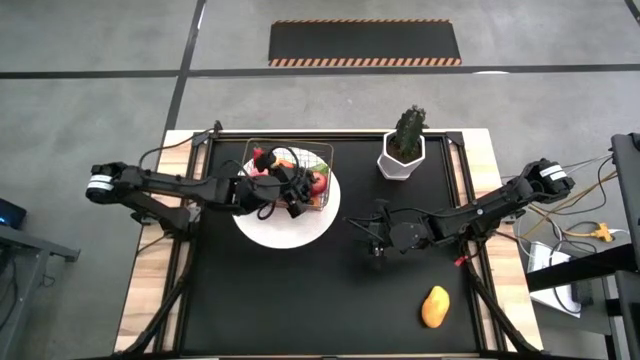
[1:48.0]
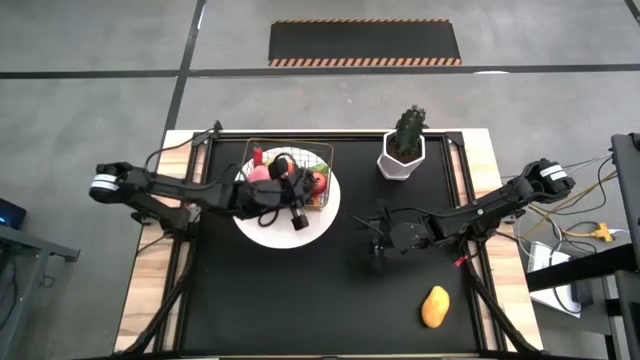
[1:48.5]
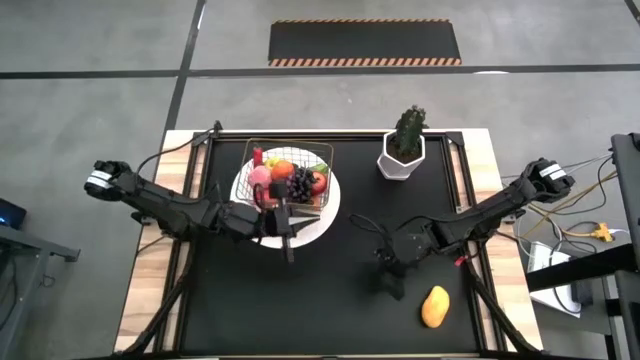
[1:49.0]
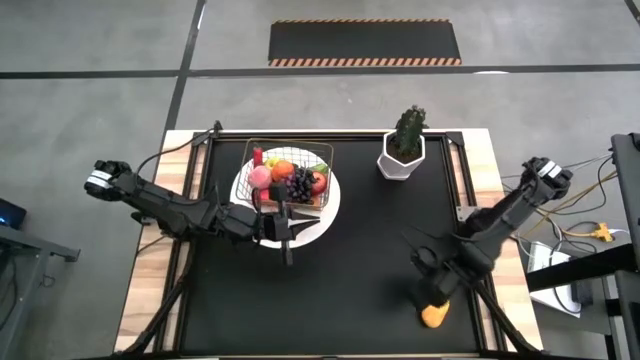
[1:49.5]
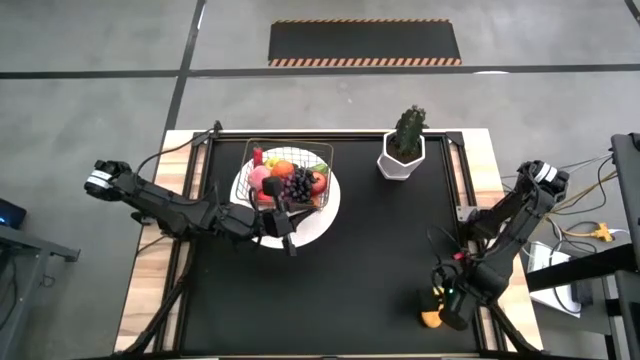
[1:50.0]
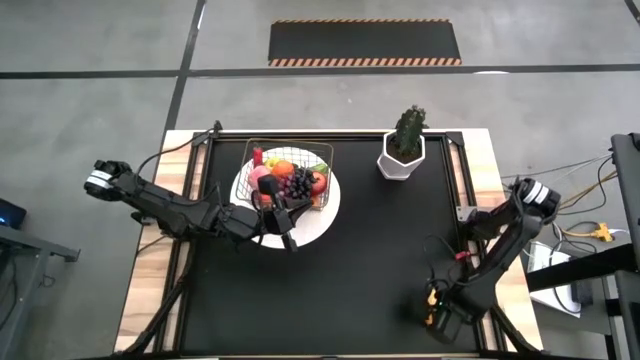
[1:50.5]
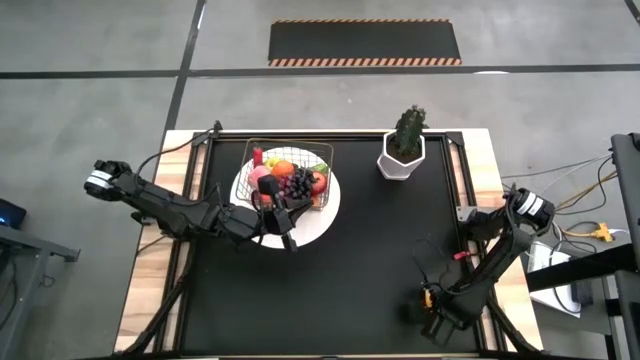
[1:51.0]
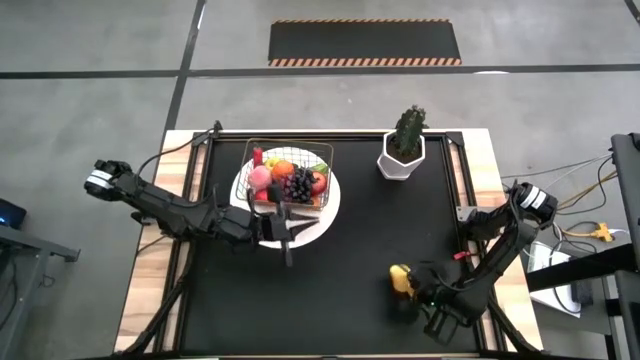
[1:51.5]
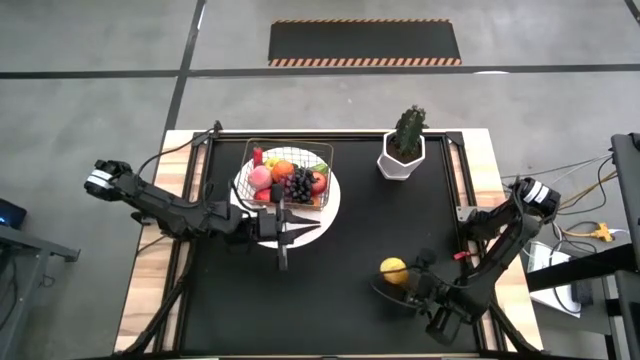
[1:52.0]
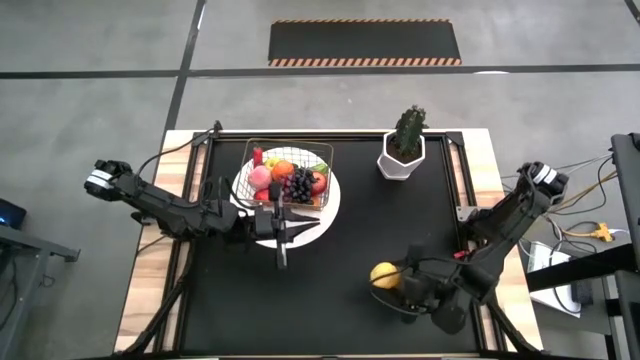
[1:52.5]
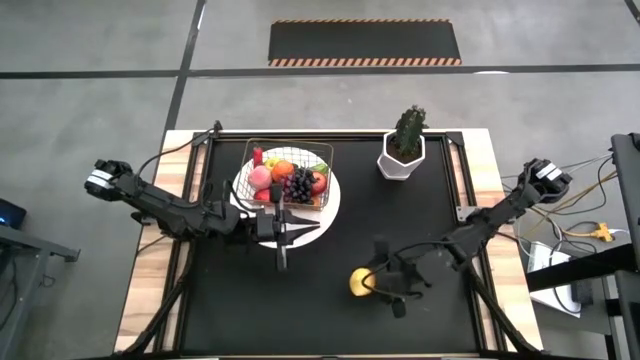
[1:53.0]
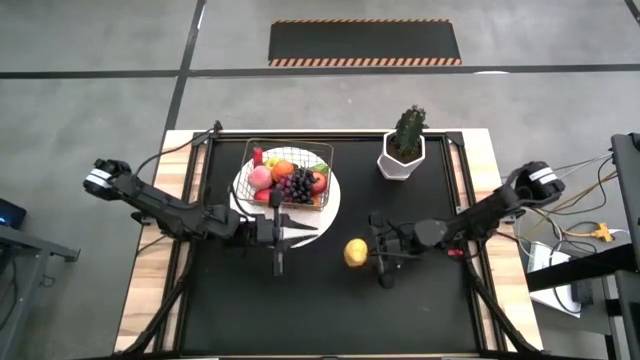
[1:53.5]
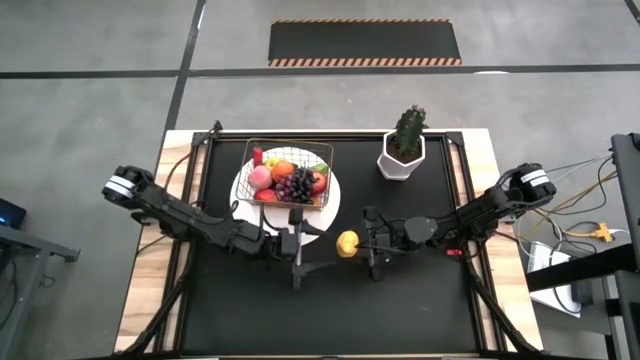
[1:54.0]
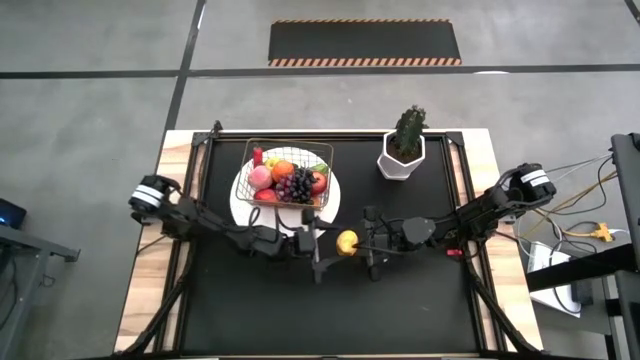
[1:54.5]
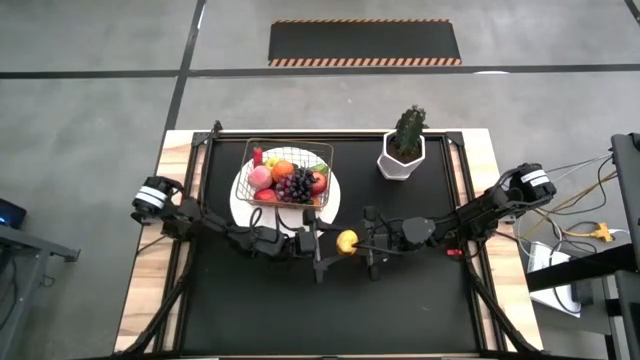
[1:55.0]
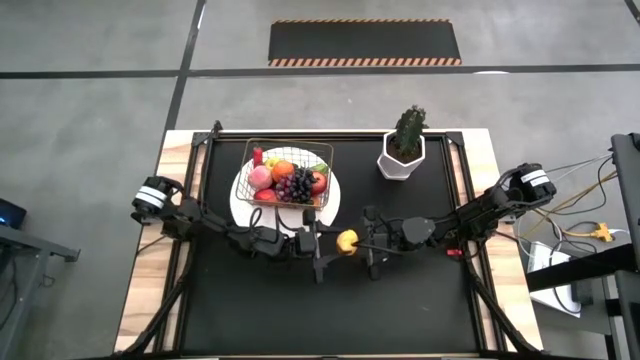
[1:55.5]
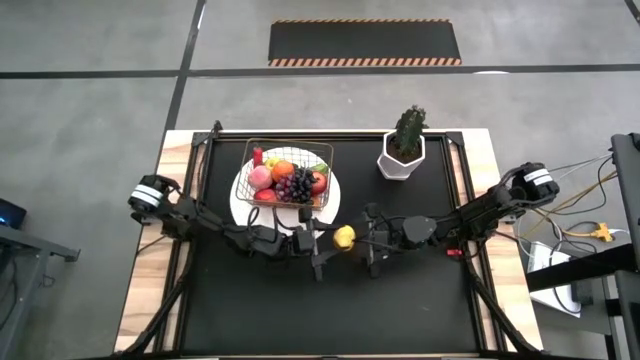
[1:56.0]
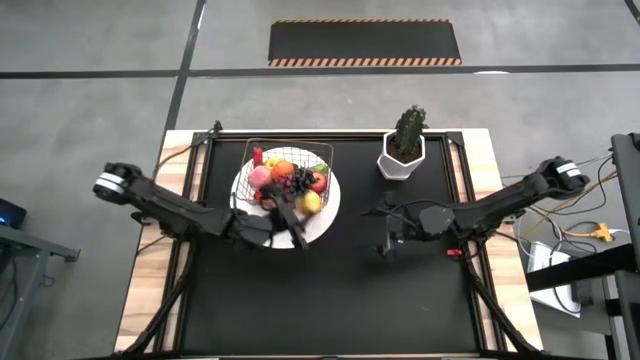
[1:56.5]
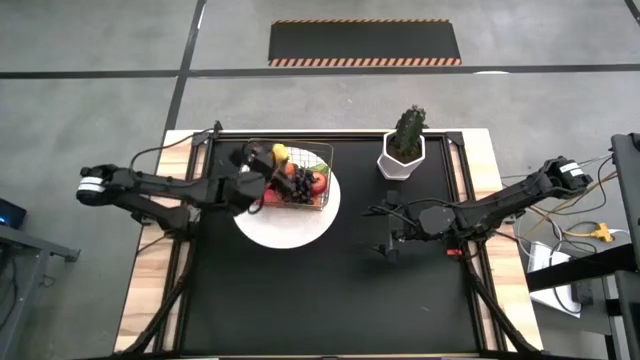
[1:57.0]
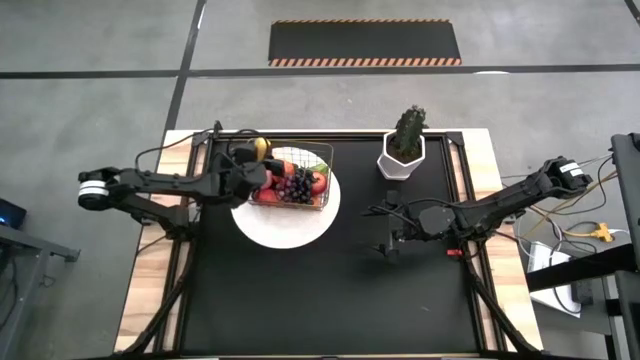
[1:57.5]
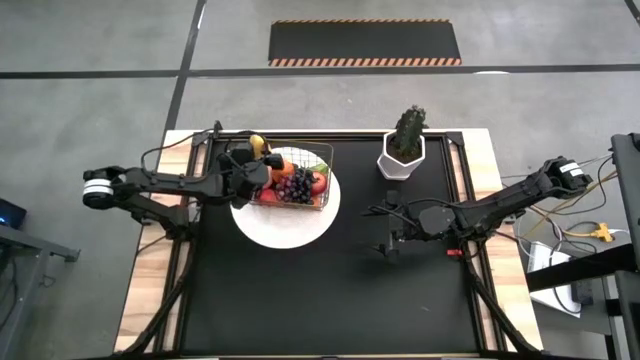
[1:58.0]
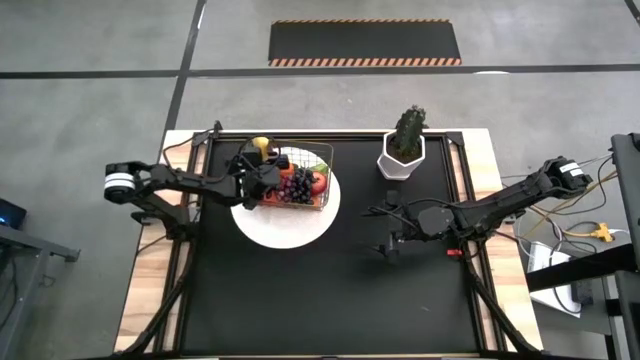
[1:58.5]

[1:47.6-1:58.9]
Task: Build produce basket
Put the mango in the gold wire basket

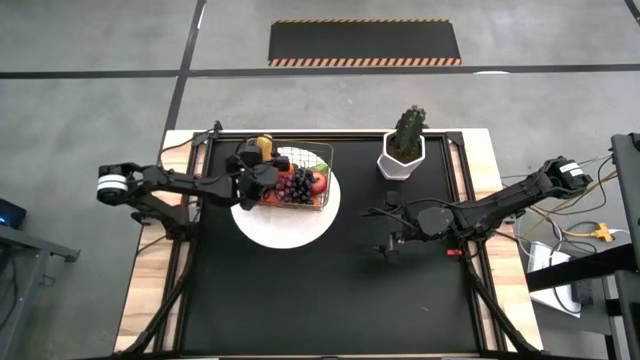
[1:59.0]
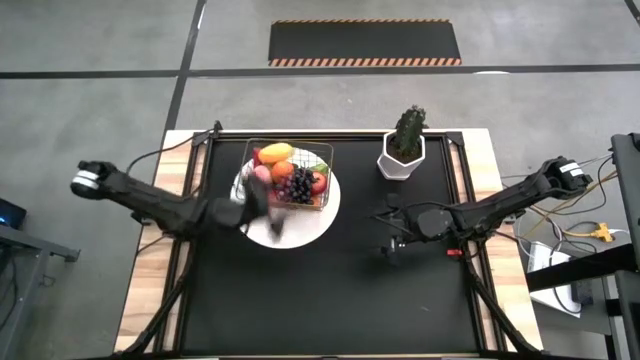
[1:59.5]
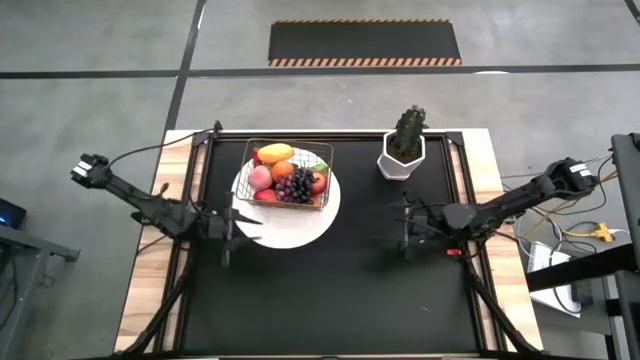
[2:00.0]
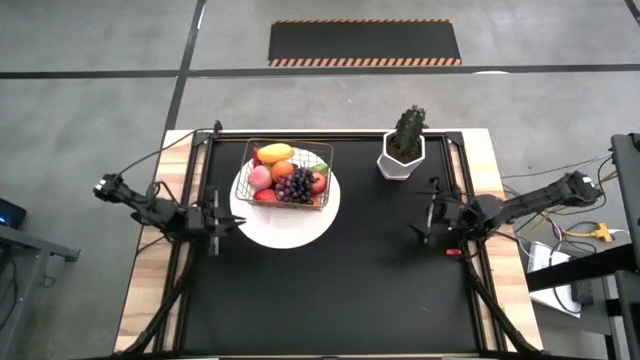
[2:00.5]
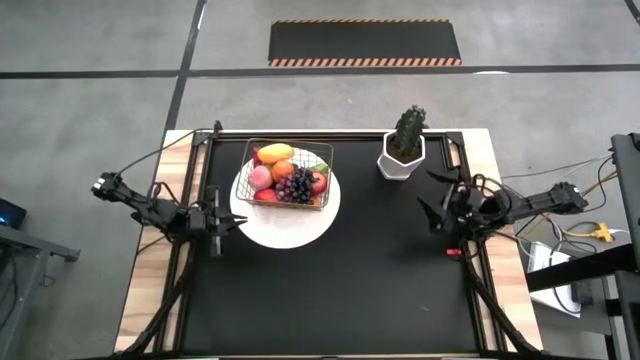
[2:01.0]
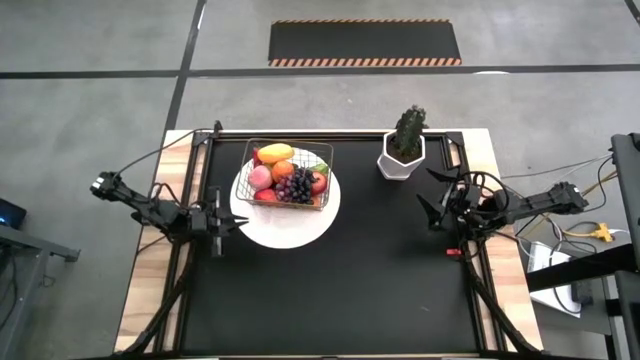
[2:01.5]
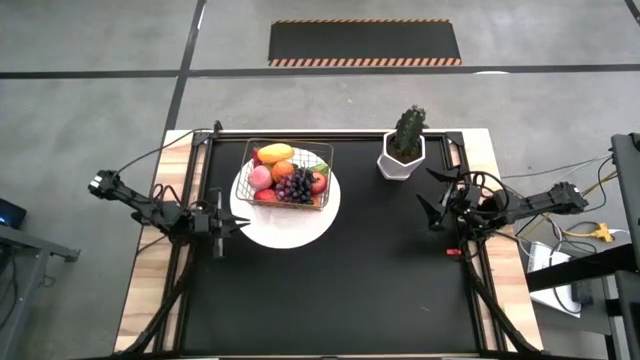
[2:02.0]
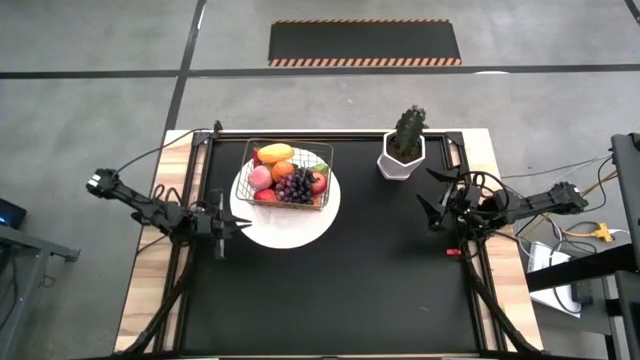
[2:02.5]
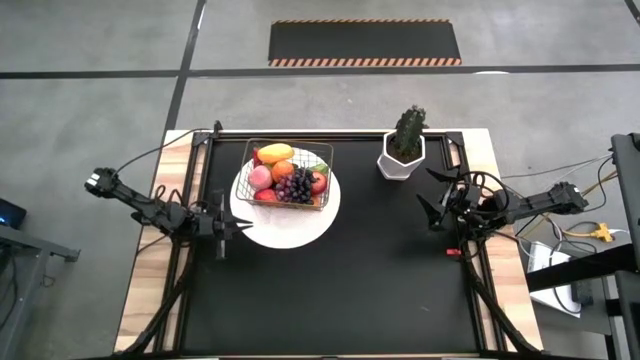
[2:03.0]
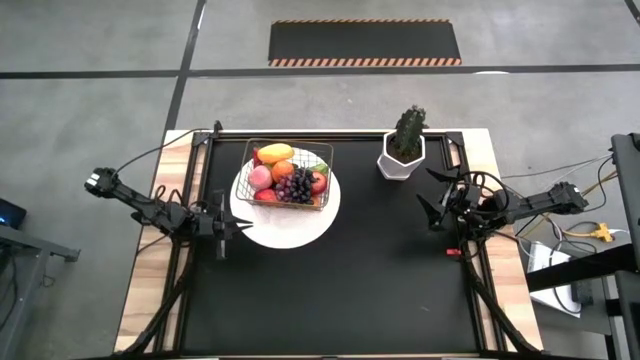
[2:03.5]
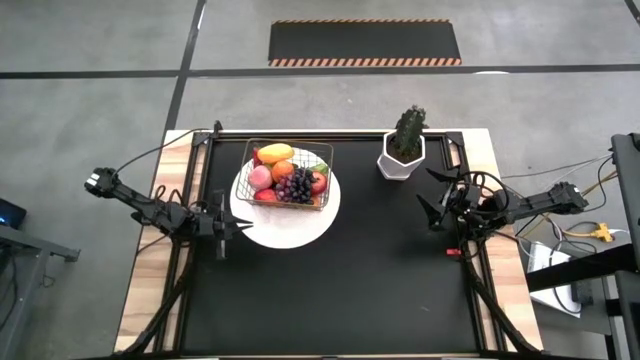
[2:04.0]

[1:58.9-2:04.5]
Return to Home Position

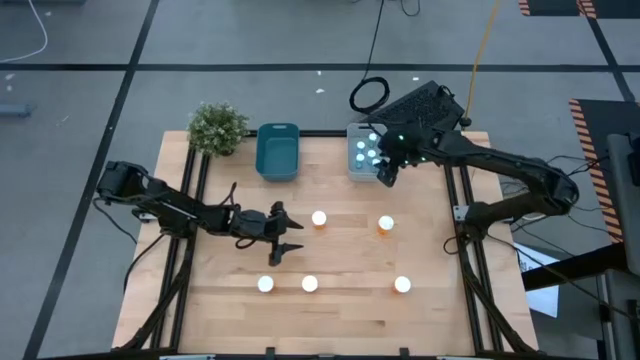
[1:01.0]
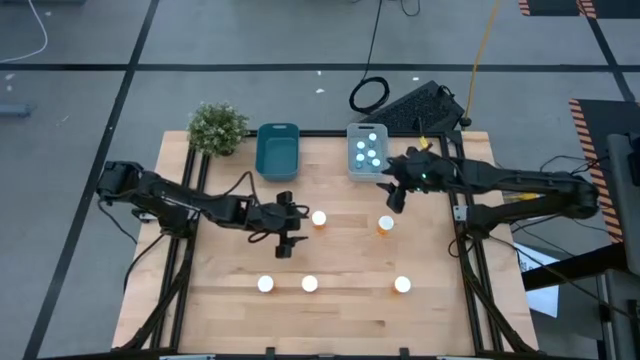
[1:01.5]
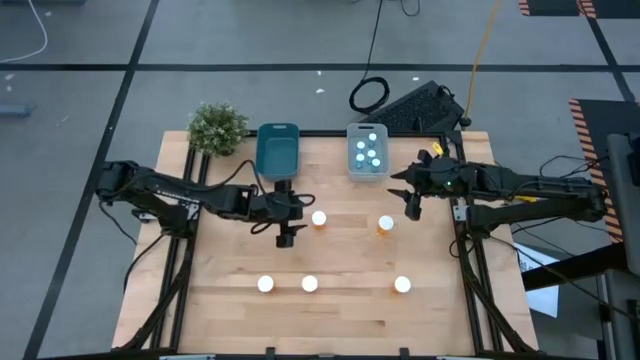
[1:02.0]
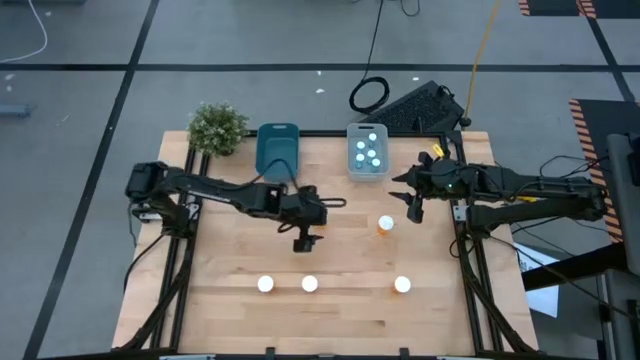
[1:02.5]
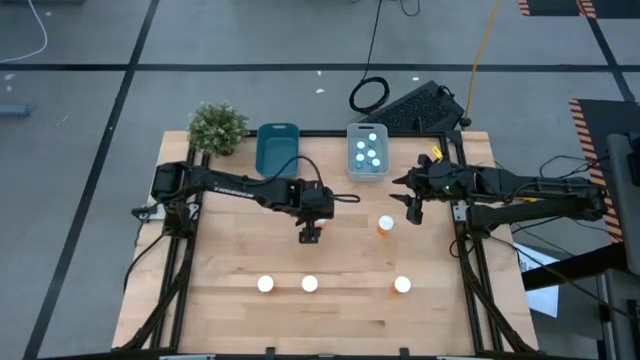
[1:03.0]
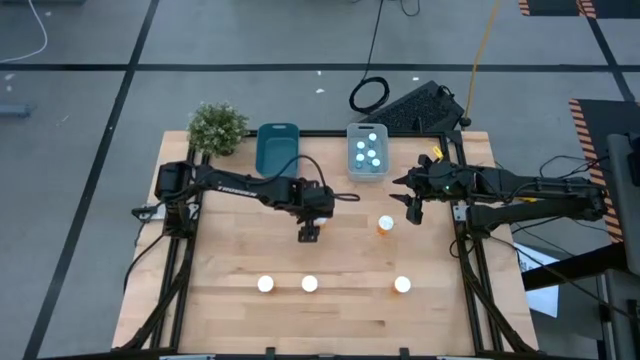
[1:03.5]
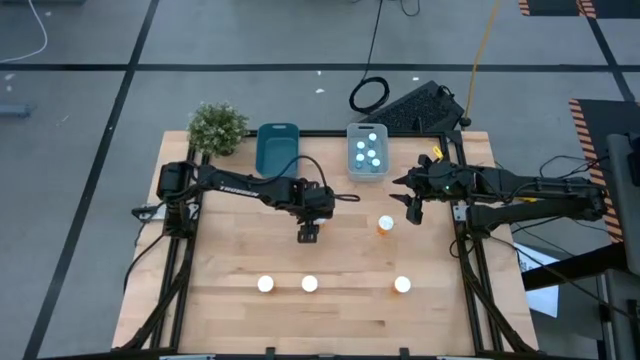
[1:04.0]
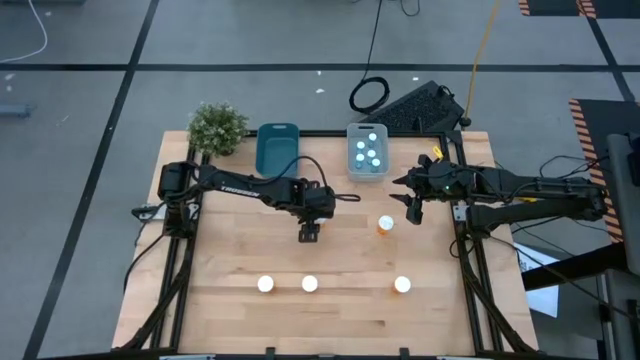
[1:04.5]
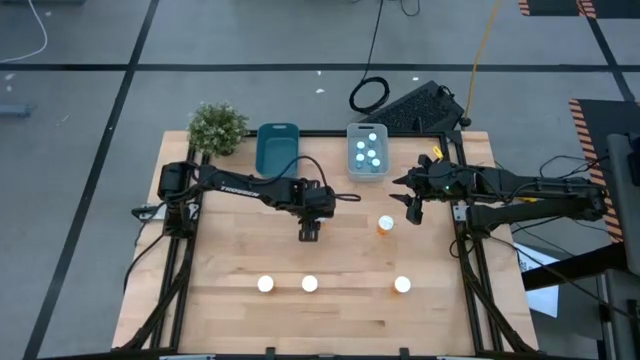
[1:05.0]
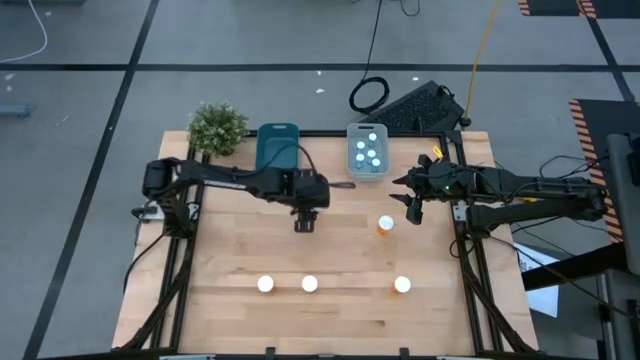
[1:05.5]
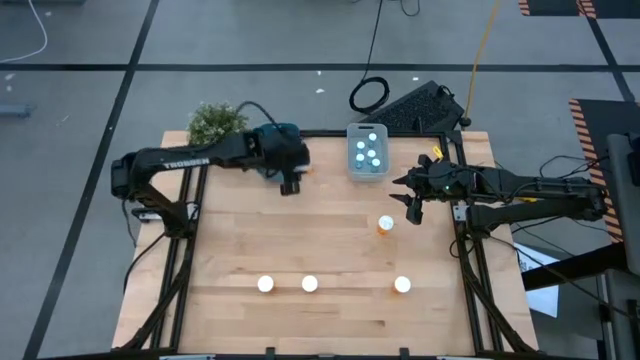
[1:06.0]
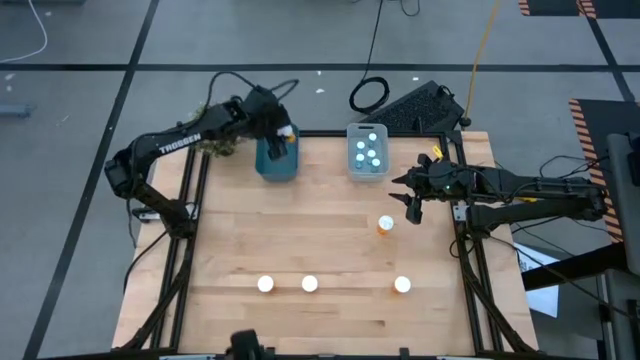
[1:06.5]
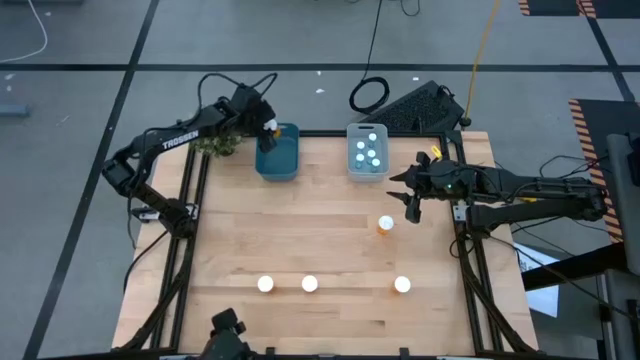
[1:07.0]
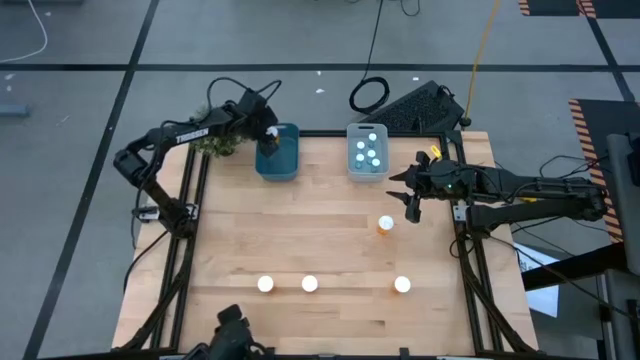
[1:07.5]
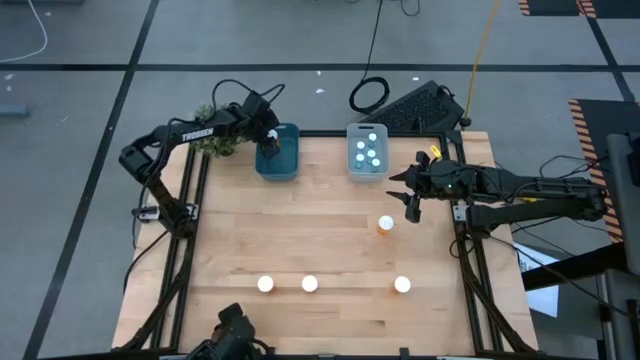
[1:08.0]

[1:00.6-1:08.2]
Task: Pick and place medicine bottles into bin by pill shape (circle, oval)
Put the orange pill bottle into the green bin
